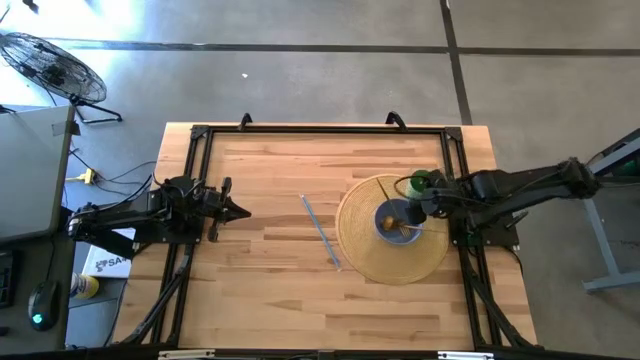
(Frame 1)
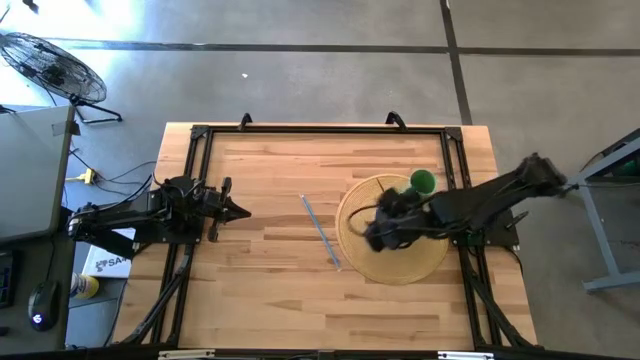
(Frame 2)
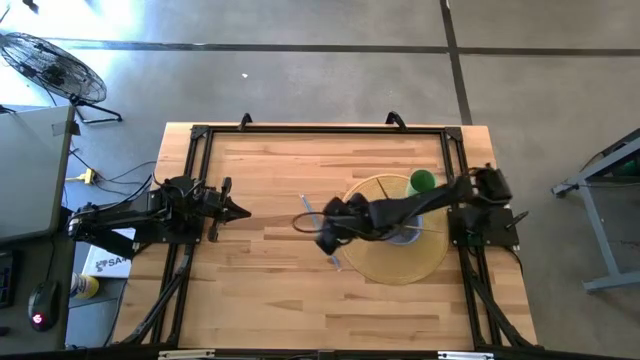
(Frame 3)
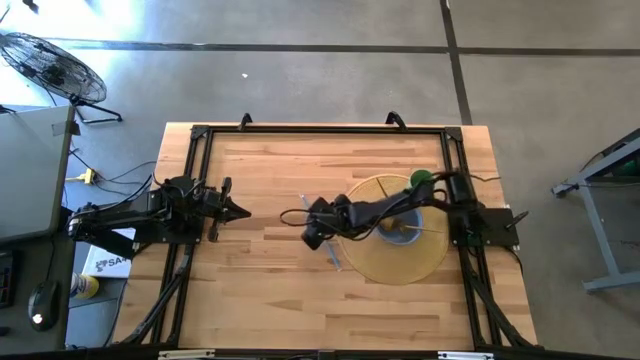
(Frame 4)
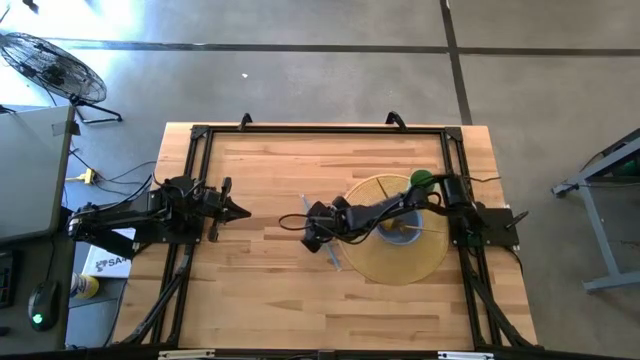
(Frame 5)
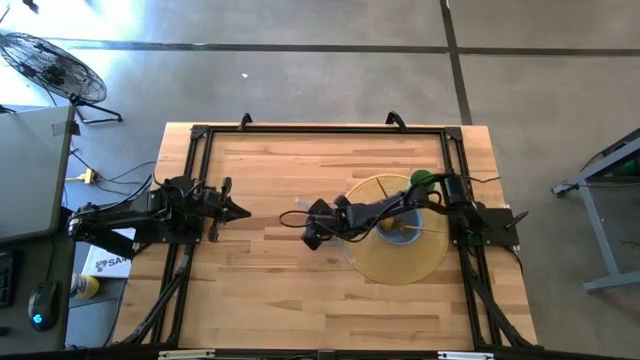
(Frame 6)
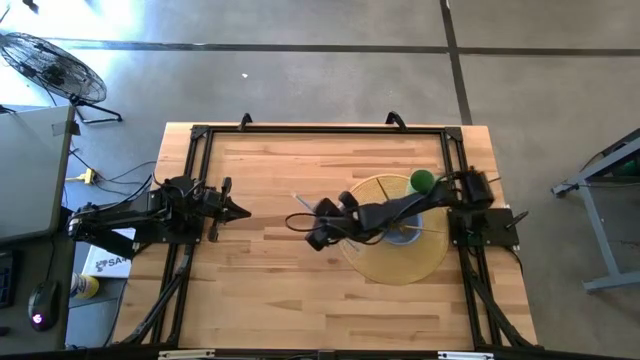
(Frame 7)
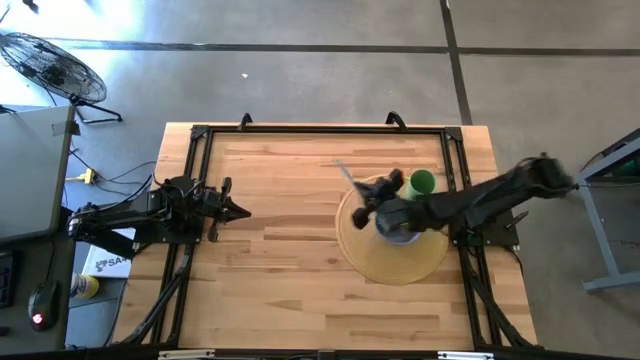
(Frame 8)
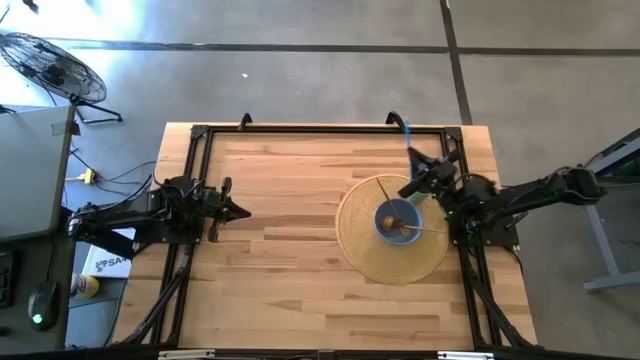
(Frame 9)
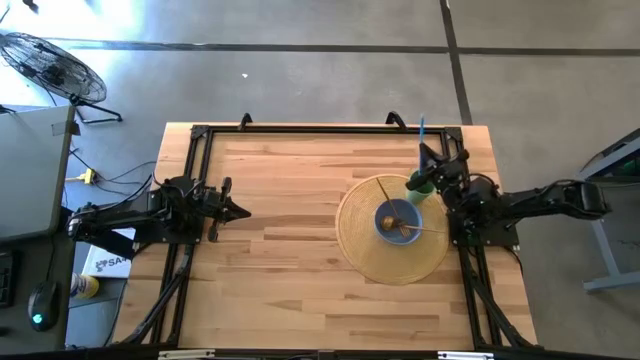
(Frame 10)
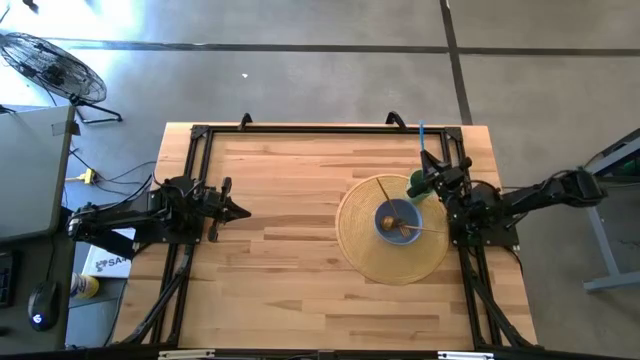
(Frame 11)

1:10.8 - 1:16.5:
Task: Pick & Place Utensil
Put the blue straw into the green cup on the brown mat

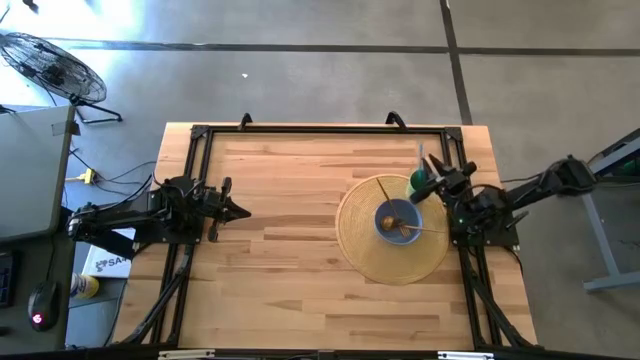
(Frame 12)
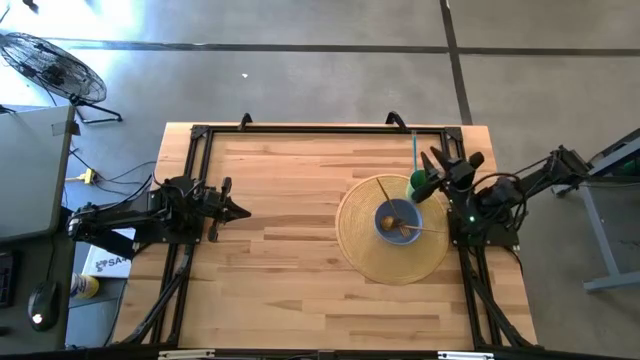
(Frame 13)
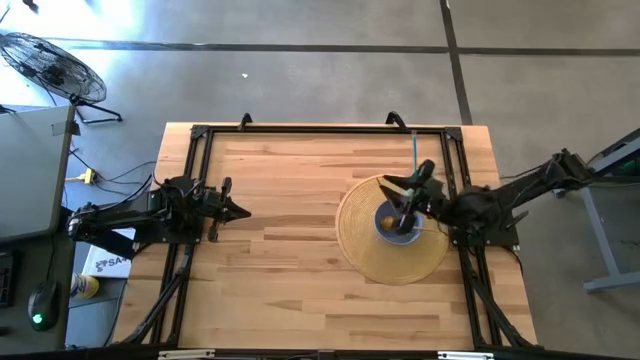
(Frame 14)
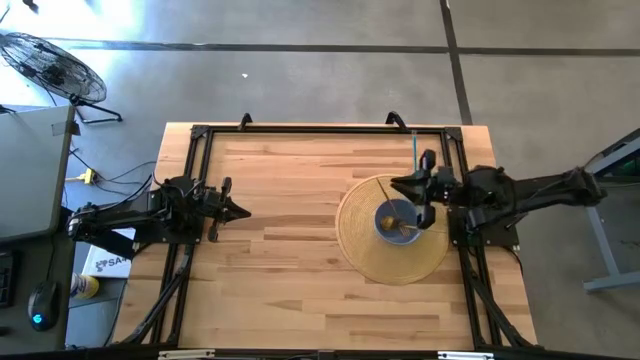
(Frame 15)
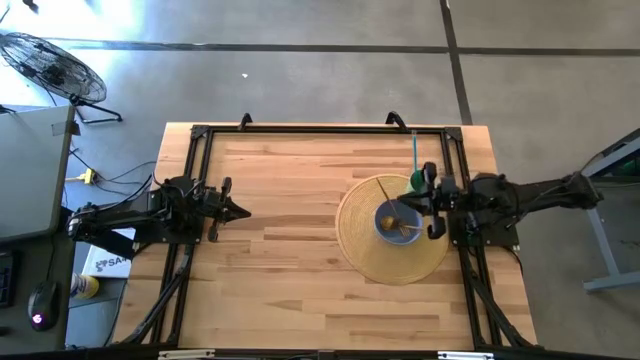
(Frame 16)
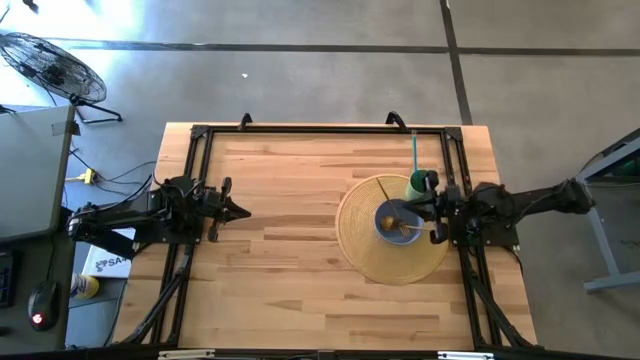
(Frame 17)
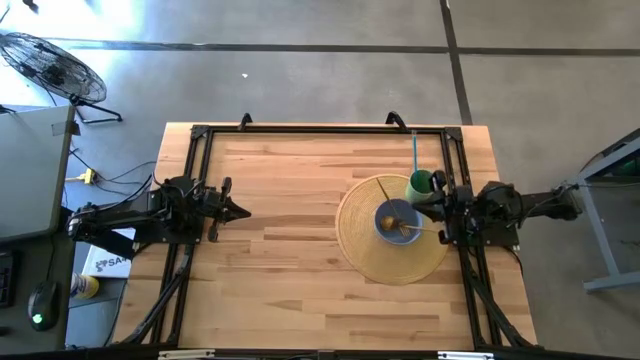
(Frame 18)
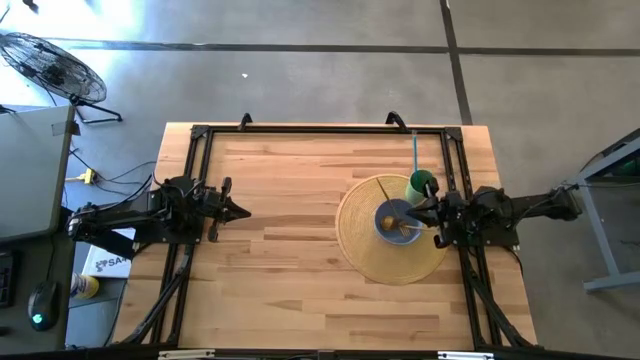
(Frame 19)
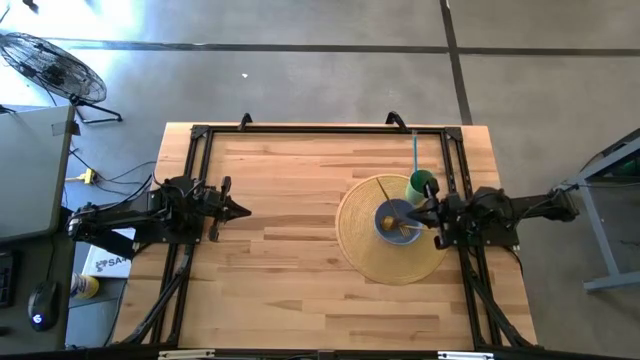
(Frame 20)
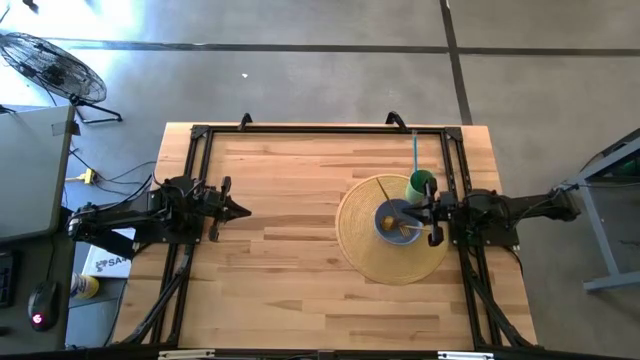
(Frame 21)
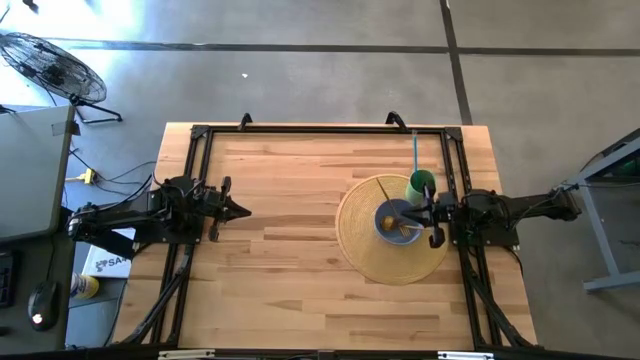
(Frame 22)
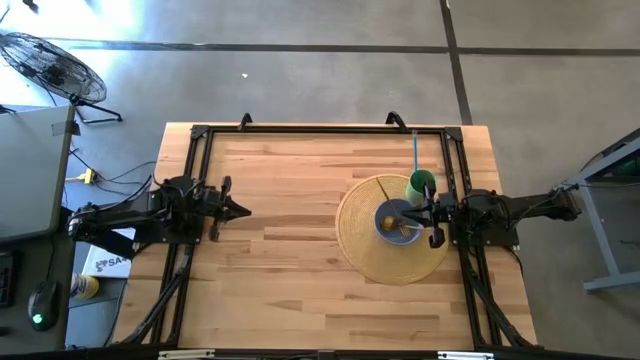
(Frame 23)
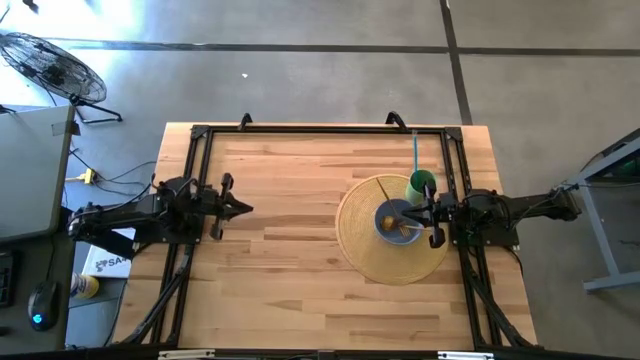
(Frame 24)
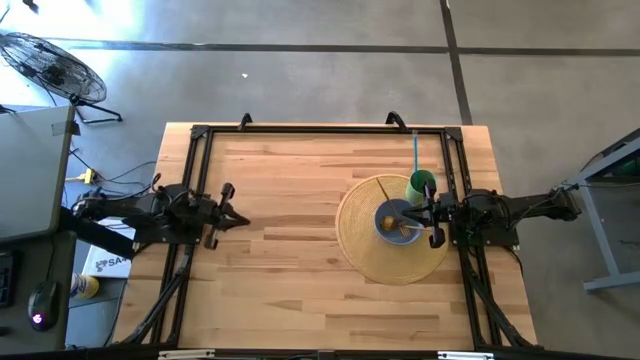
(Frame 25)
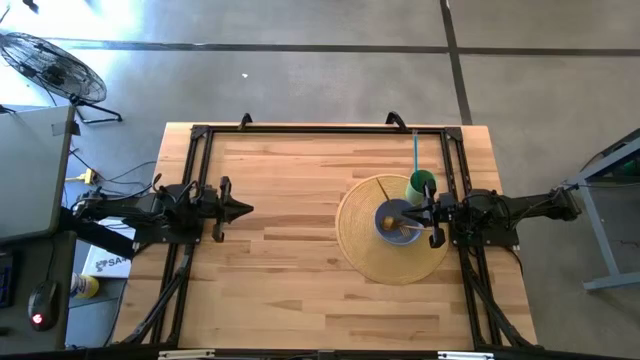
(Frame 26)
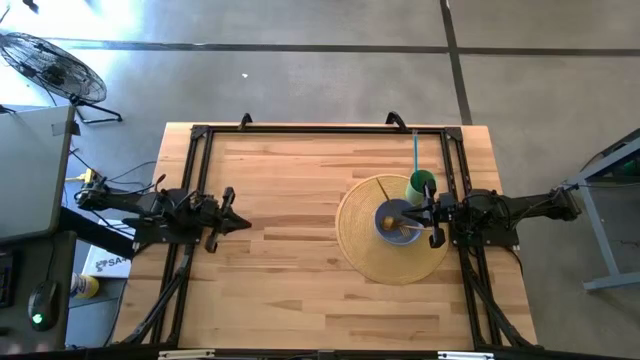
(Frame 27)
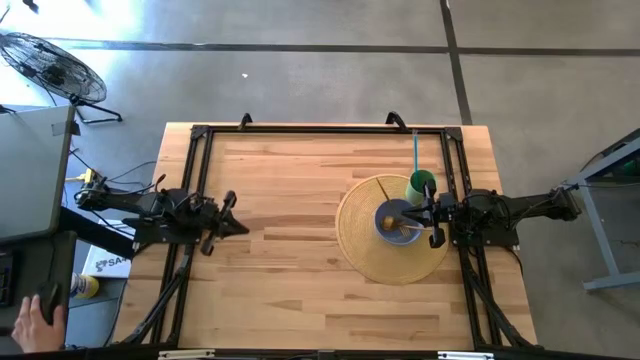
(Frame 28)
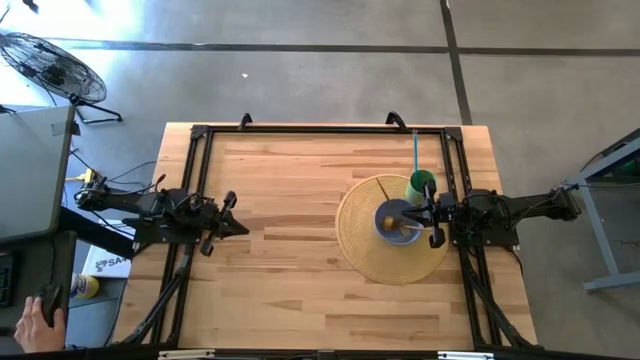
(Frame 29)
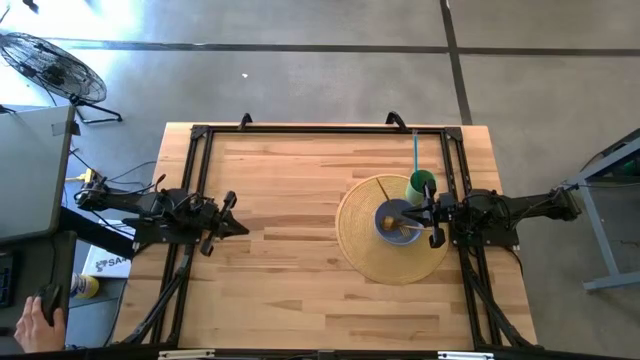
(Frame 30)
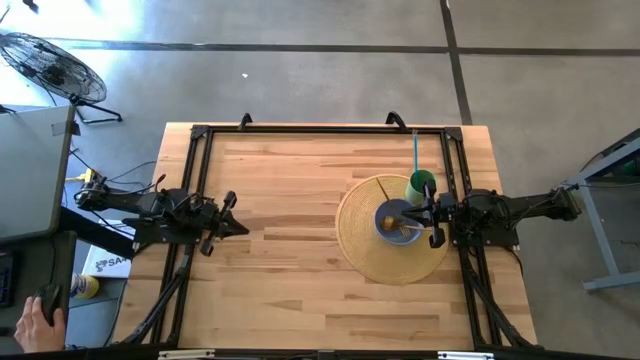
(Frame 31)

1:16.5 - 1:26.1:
Return to Home Position

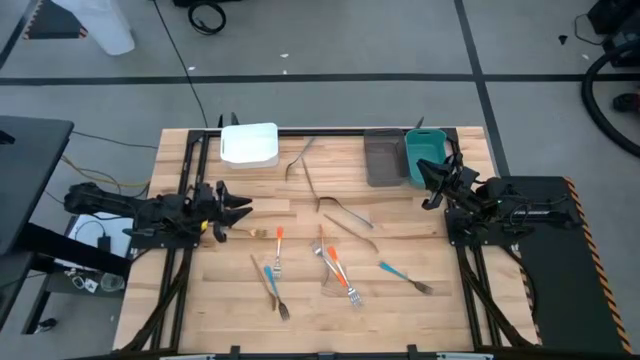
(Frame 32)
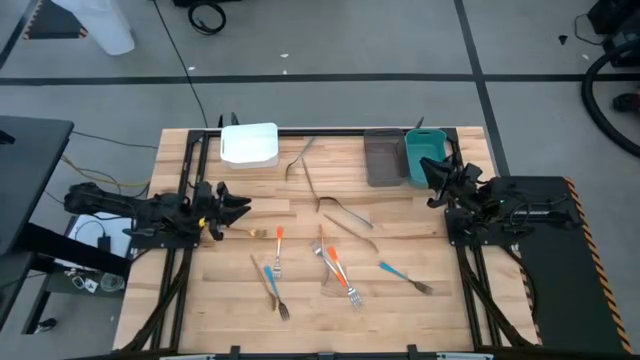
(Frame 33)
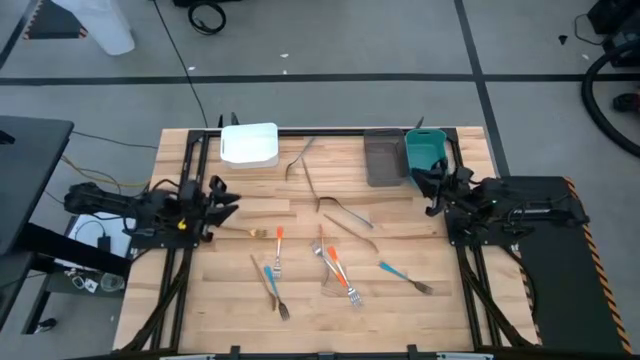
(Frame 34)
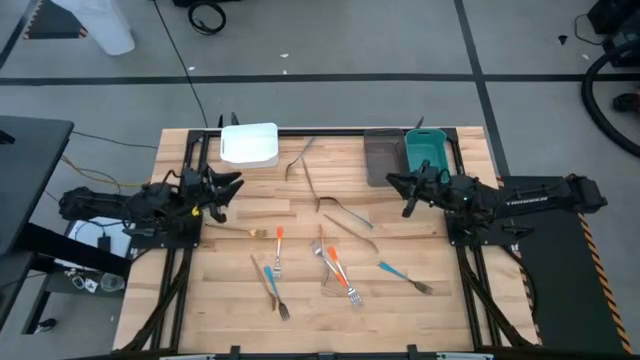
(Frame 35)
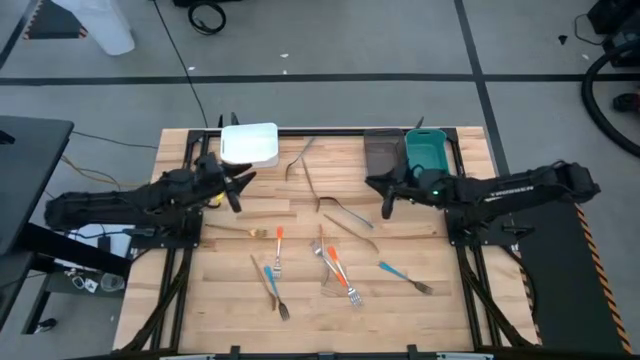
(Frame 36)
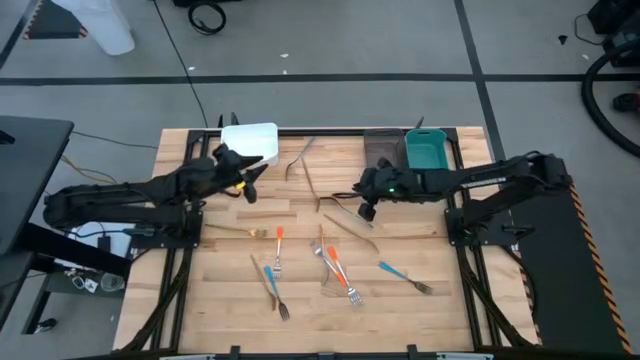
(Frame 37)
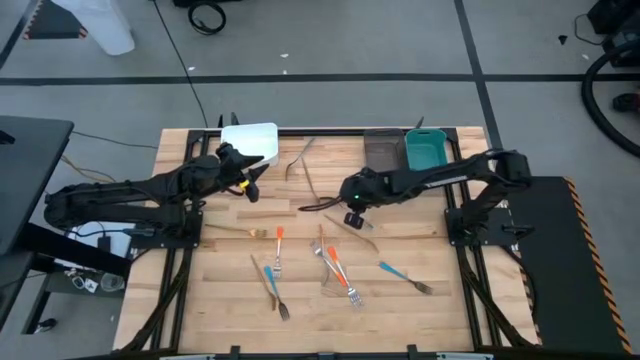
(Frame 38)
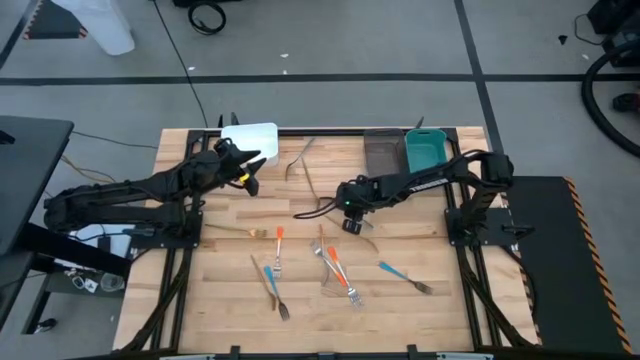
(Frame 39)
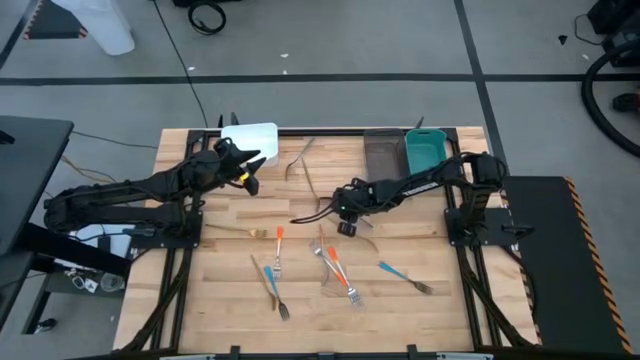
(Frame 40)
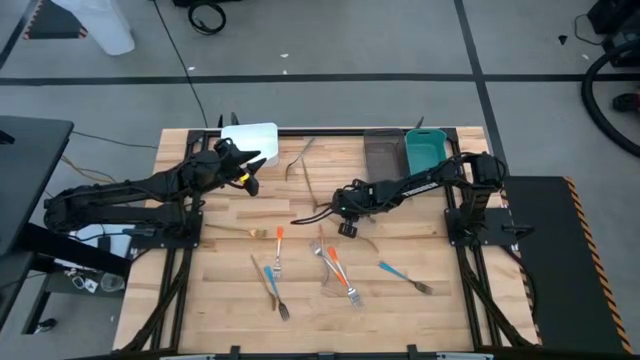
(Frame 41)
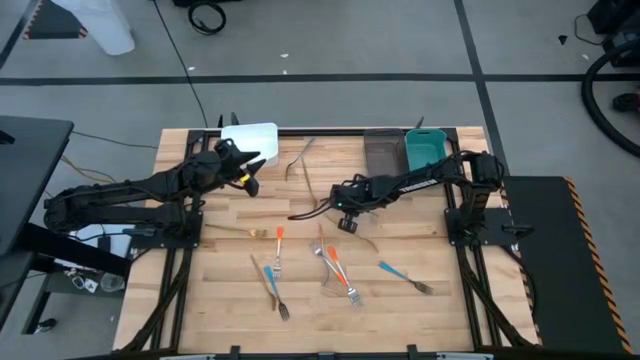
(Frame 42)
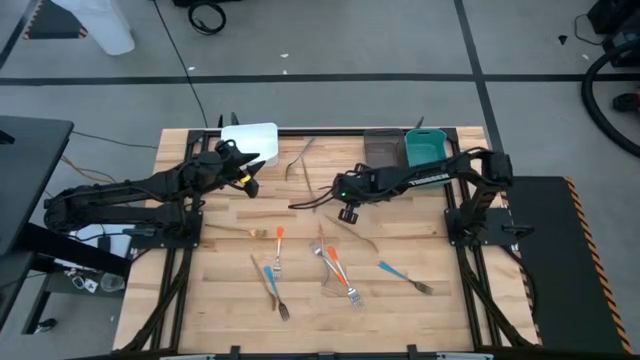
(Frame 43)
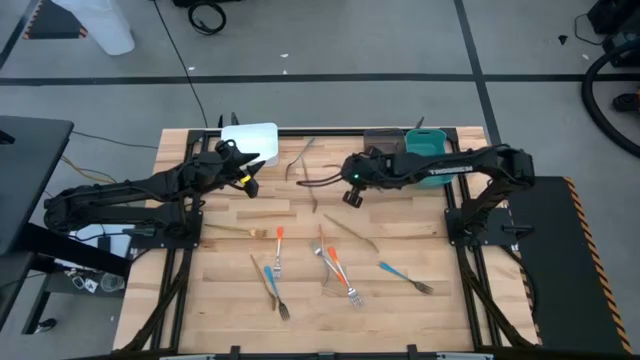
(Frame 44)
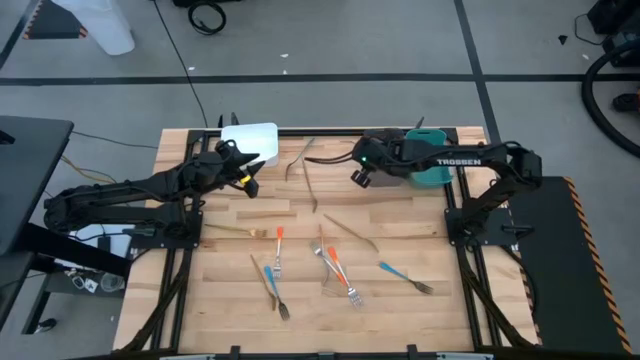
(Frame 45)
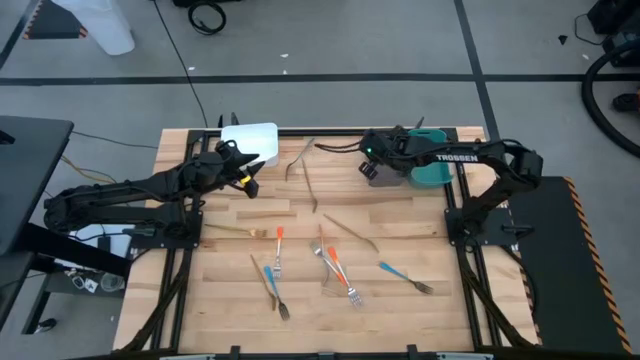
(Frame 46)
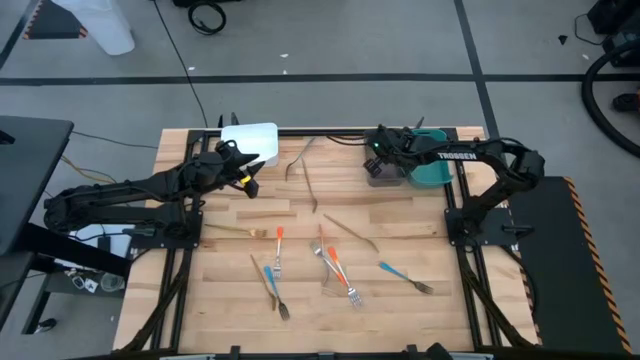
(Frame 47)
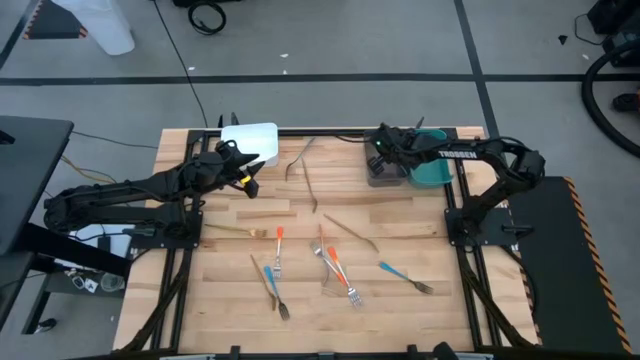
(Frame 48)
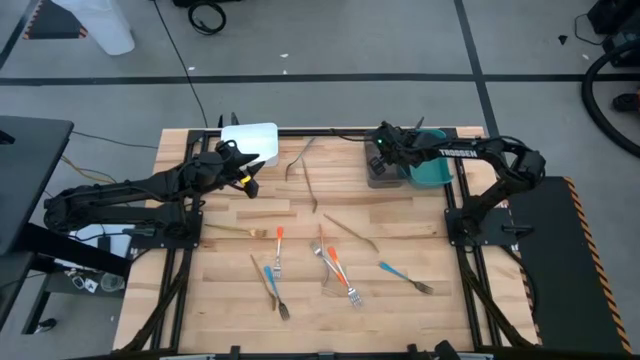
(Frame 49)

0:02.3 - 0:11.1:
Task: Sort silverware by color (type)
Put the middle right blue fork into the black bin
